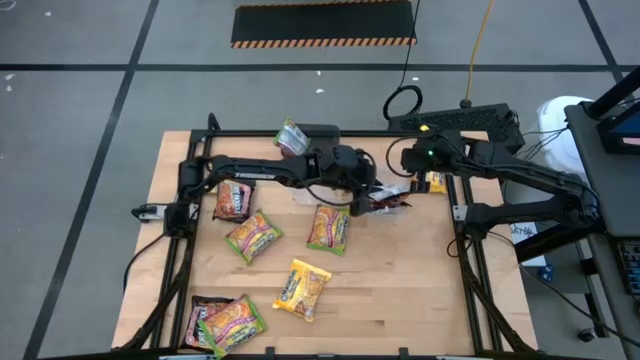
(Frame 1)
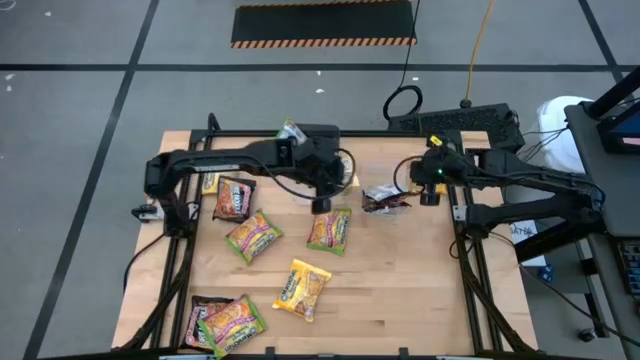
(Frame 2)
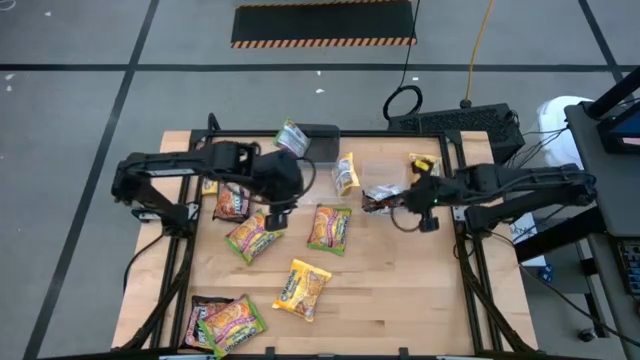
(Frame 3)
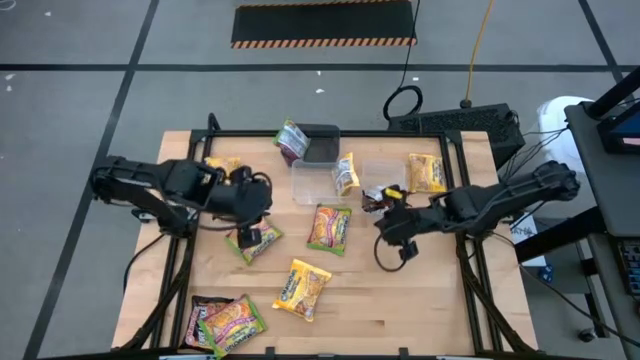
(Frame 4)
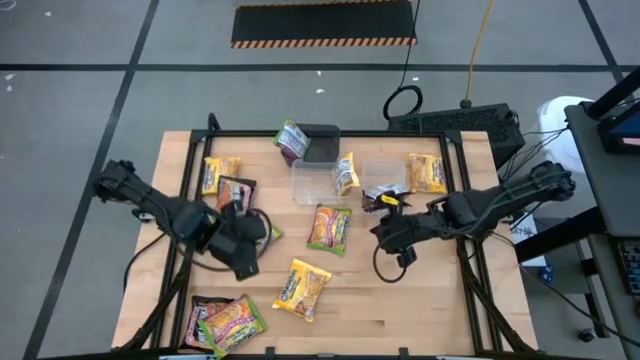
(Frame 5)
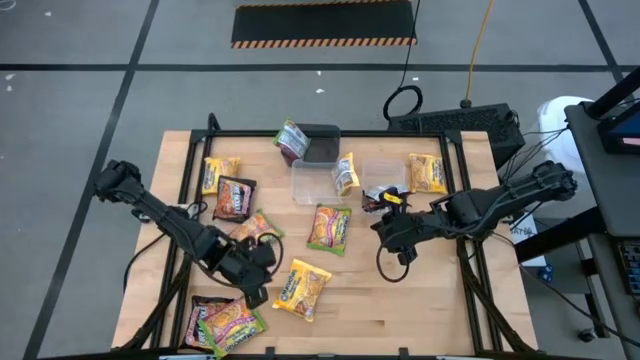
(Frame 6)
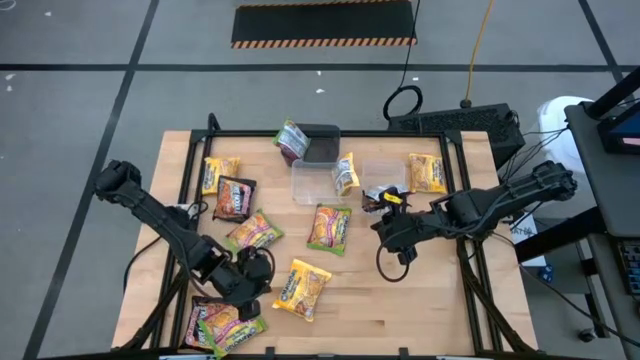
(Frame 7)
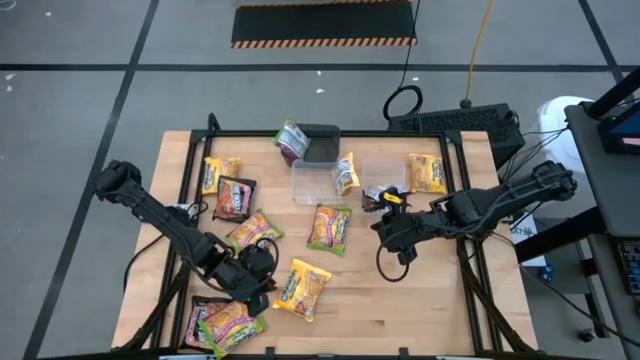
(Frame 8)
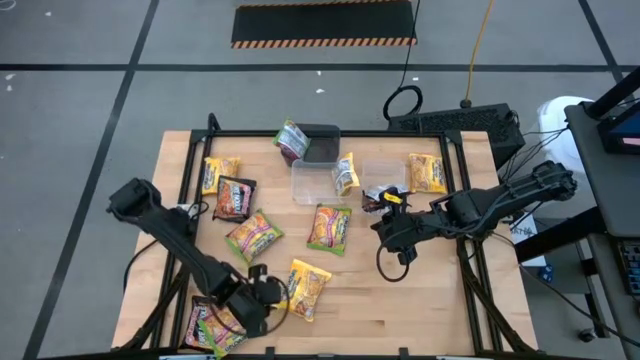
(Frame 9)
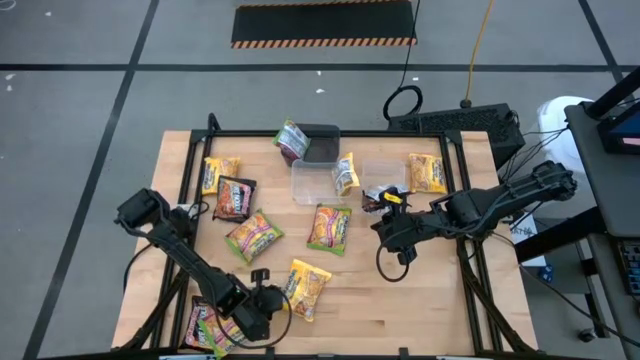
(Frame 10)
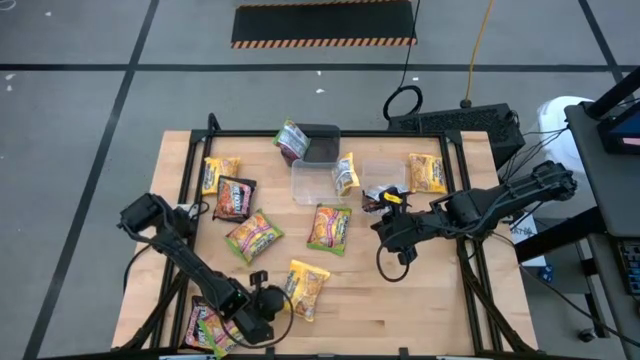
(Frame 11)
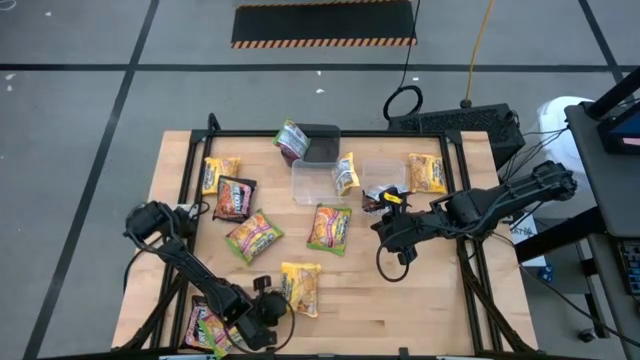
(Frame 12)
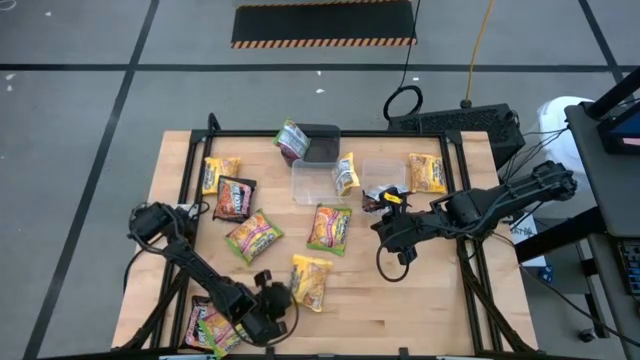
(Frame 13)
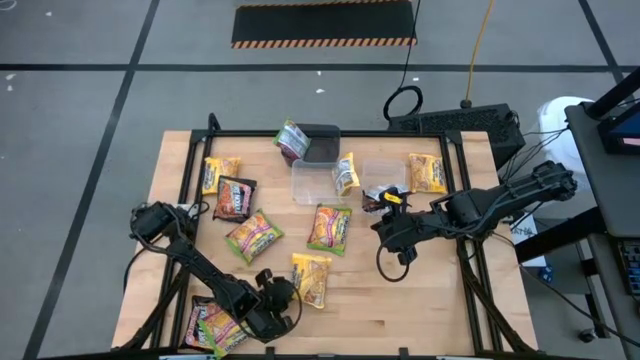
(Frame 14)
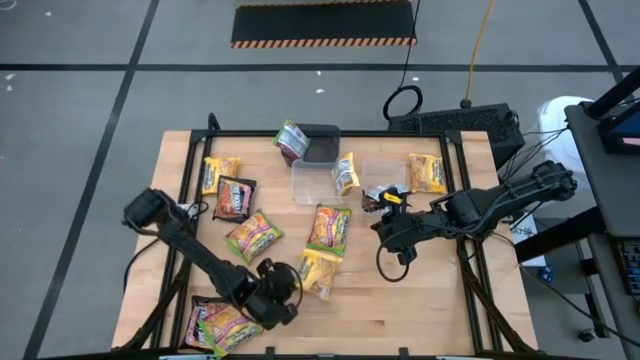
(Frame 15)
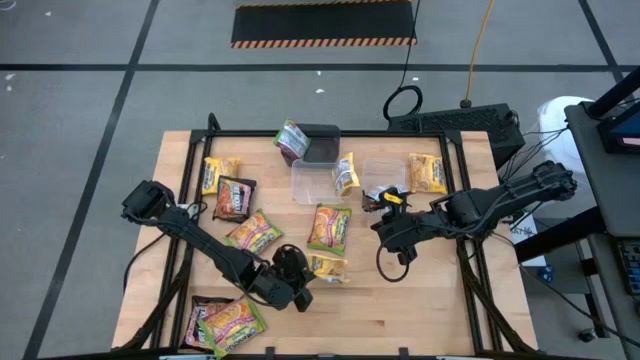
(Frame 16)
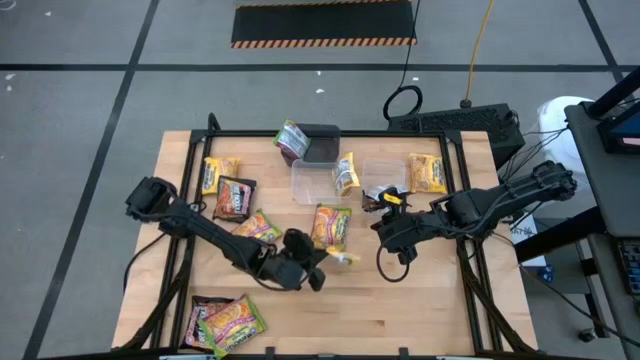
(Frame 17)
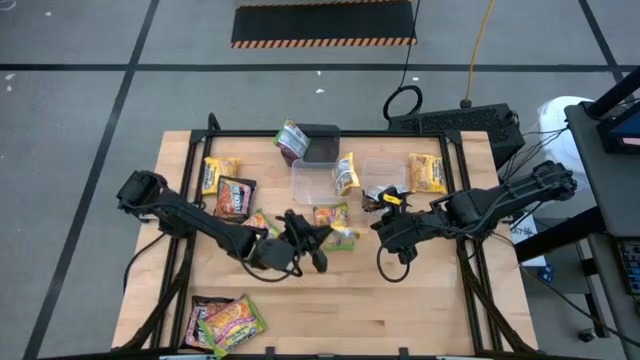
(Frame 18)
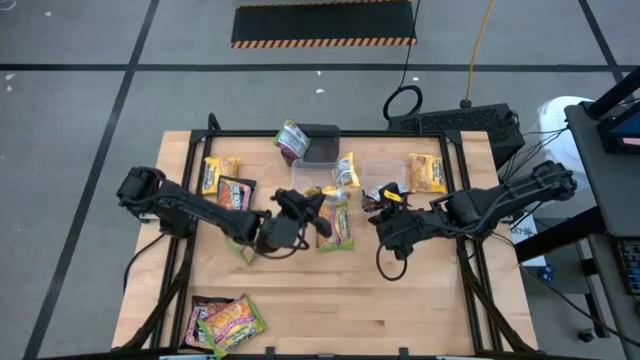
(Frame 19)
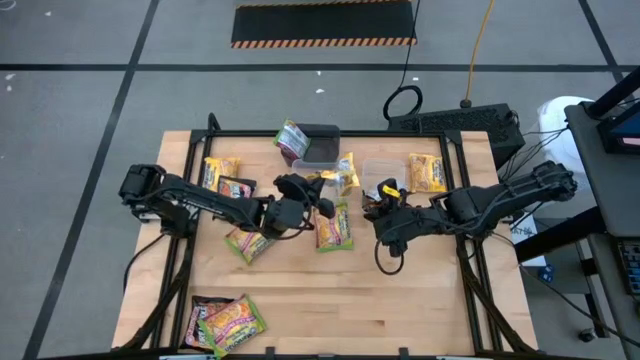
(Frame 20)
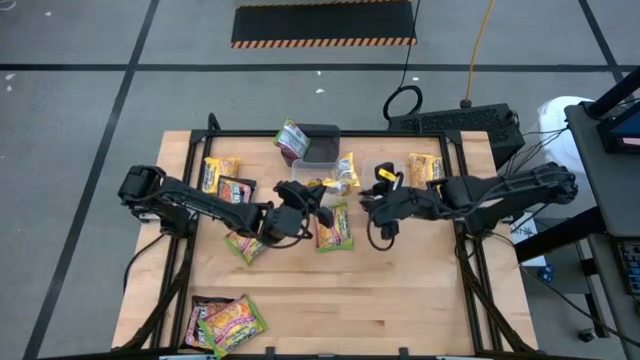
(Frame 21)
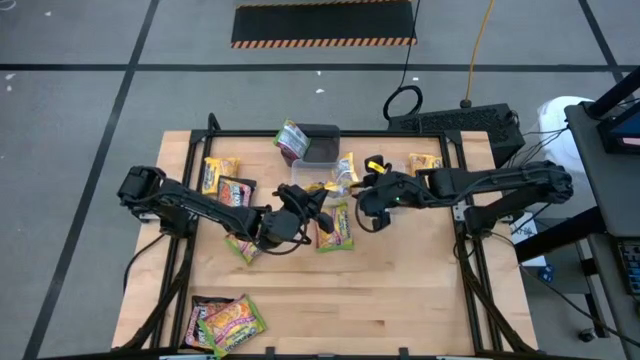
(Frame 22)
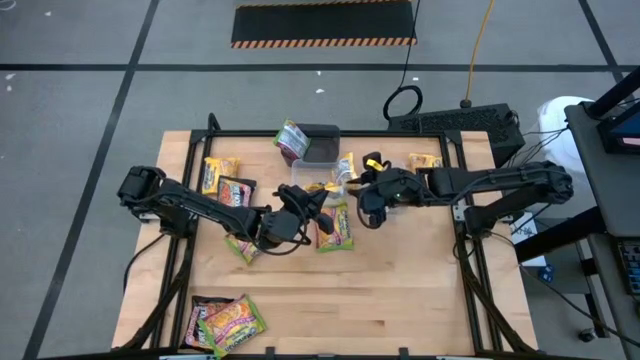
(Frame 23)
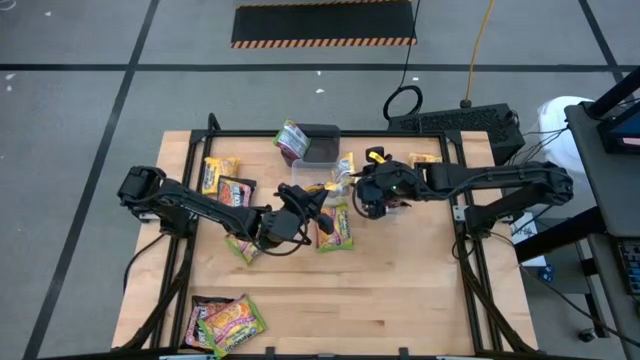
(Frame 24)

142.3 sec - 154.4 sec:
Task: Sort Maruchan noodles
Put the yellow noodle pack into the left transparent bin

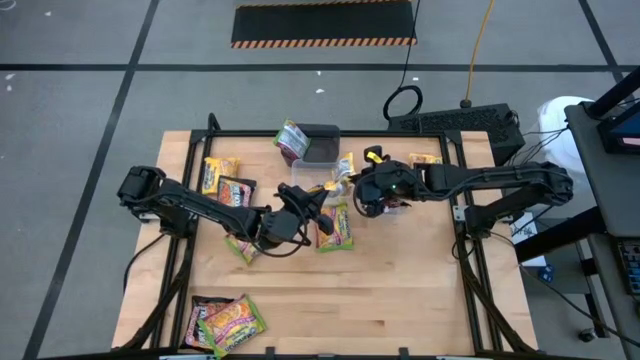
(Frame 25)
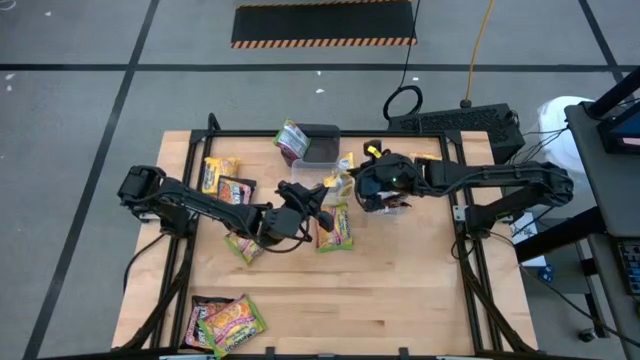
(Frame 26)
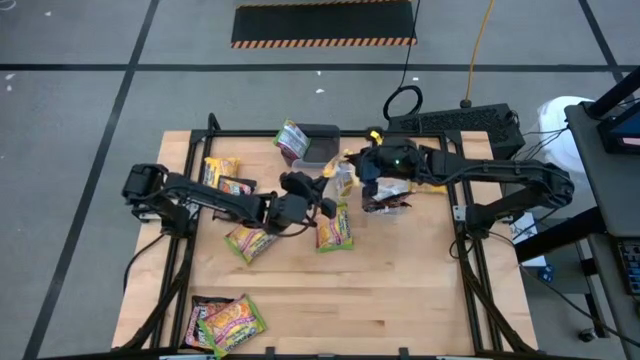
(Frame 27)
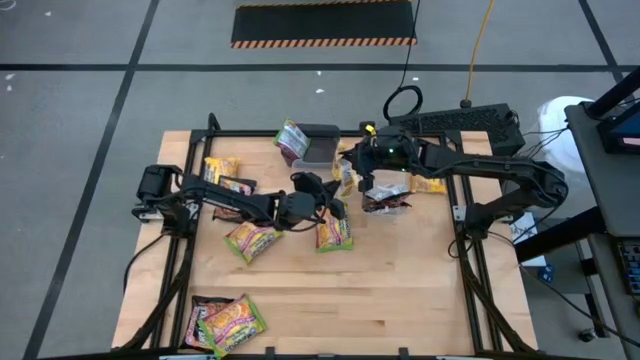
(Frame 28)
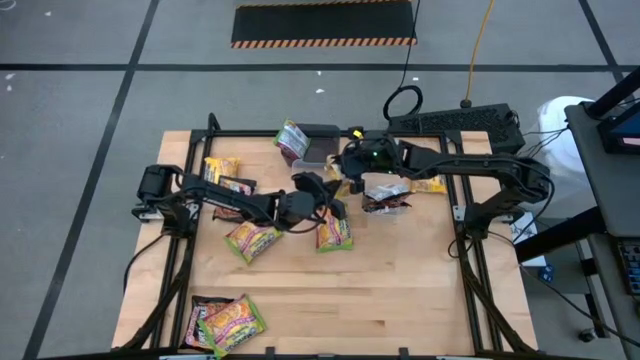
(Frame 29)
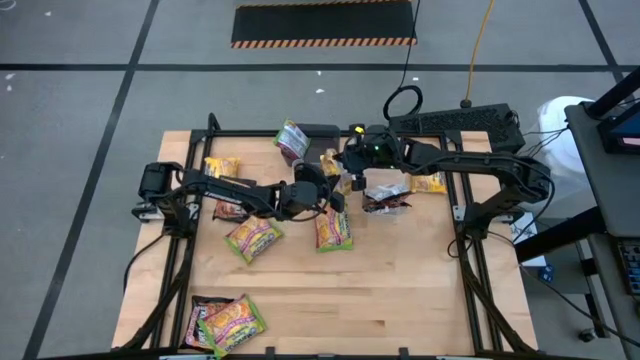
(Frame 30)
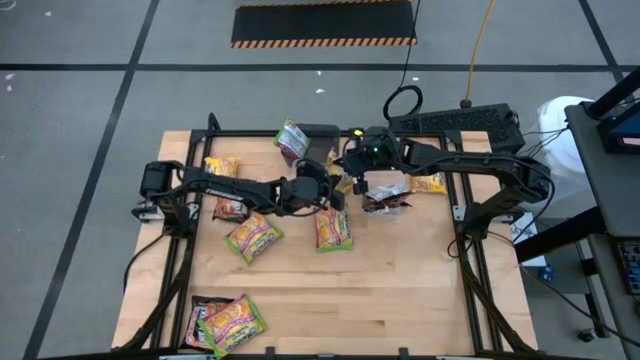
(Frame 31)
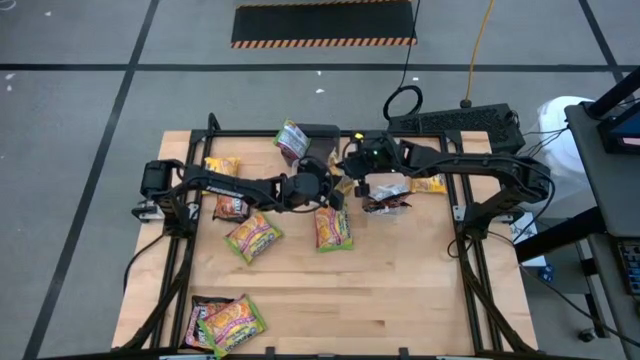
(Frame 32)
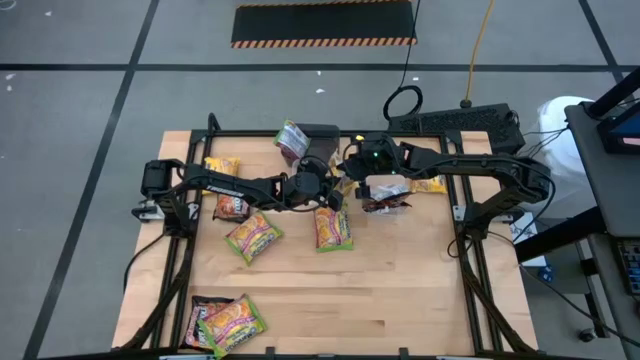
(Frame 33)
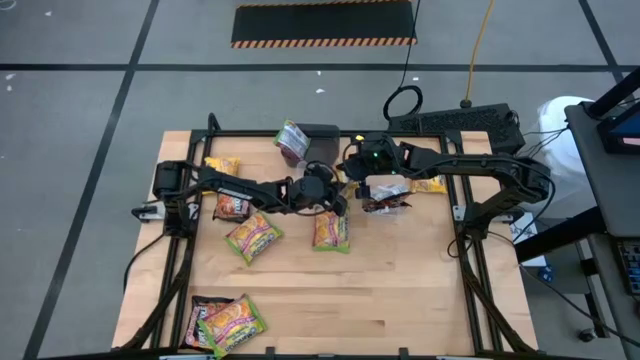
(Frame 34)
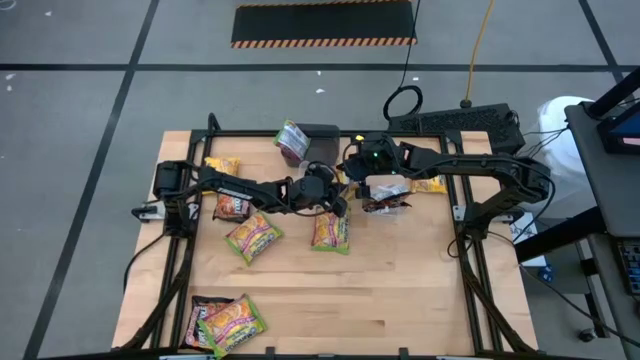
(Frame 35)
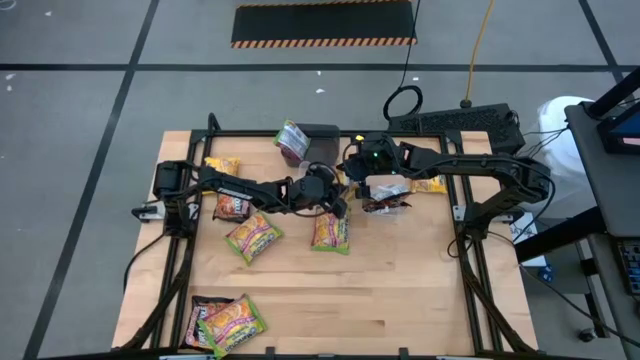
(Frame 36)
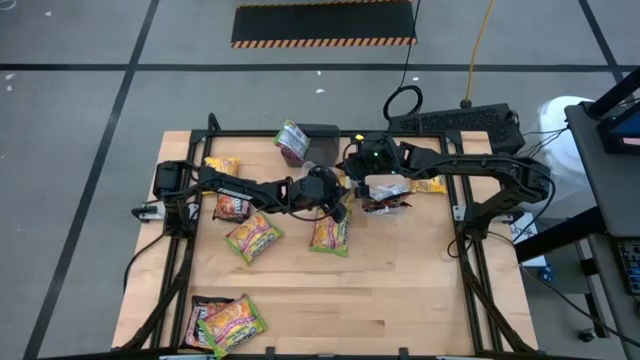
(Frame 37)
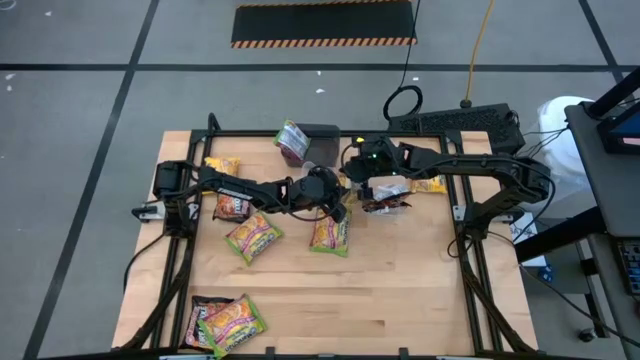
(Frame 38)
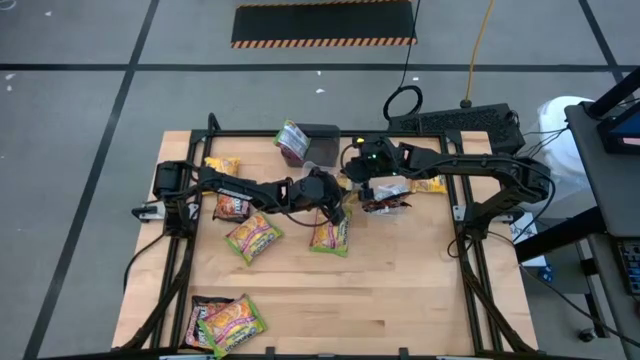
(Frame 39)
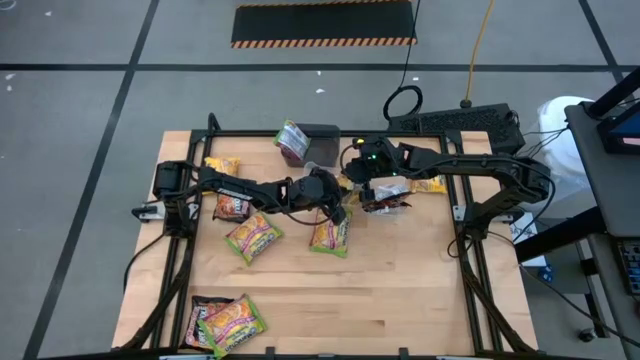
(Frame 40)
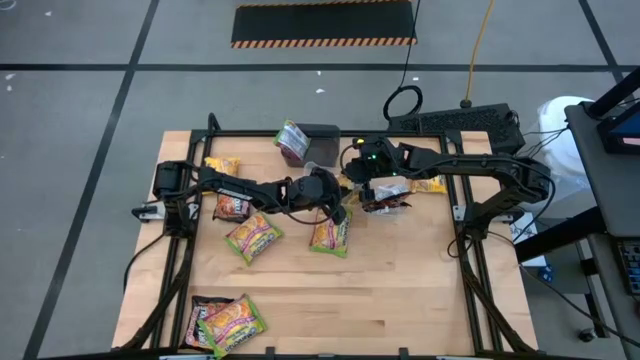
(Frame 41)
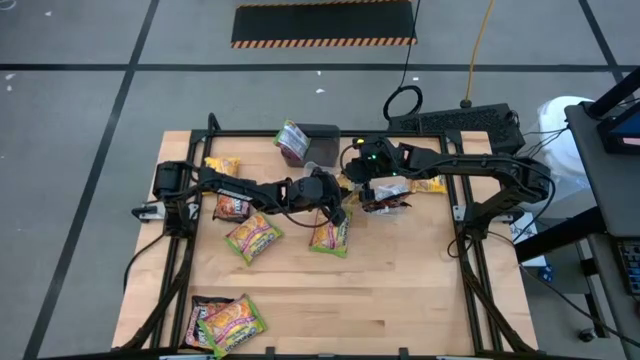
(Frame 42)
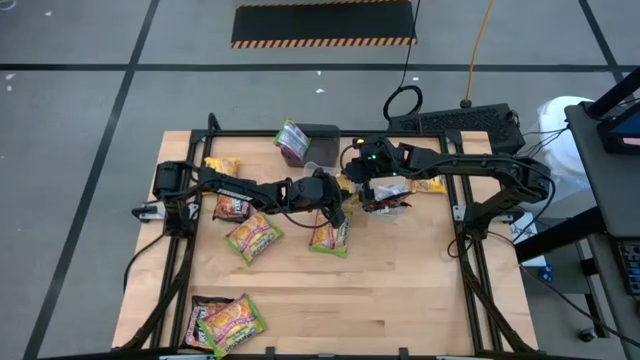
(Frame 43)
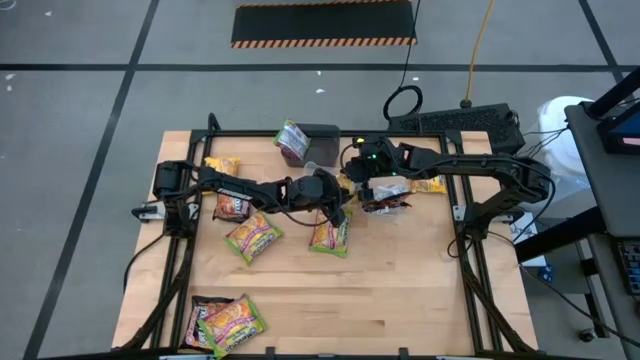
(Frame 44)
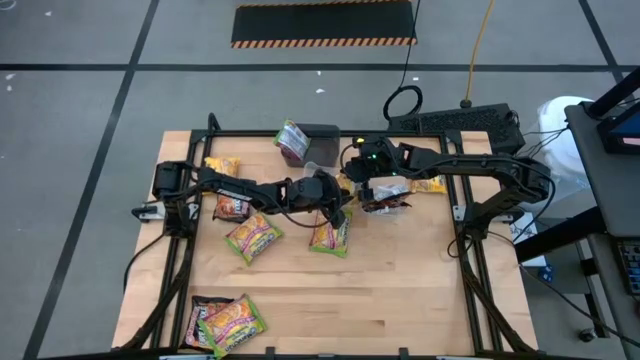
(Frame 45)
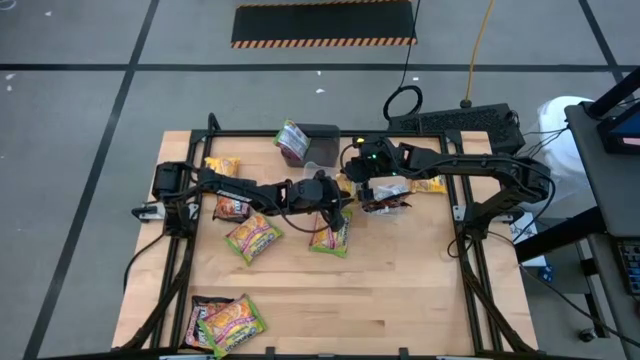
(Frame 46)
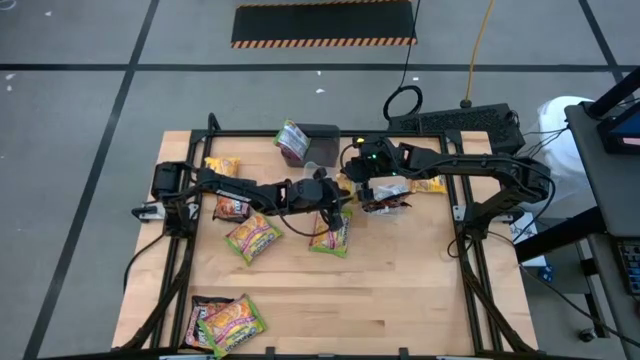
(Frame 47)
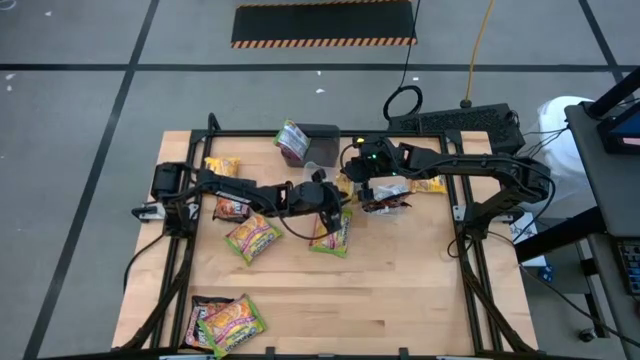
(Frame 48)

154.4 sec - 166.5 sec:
Put the yellow noodle pack into the left transparent bin
